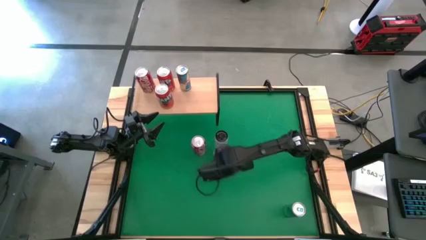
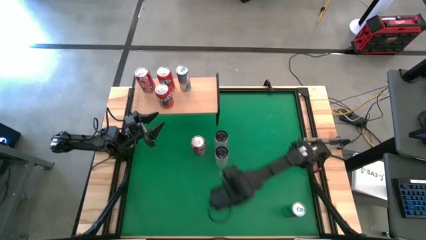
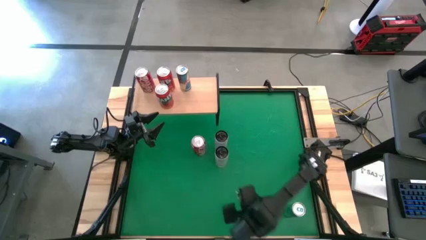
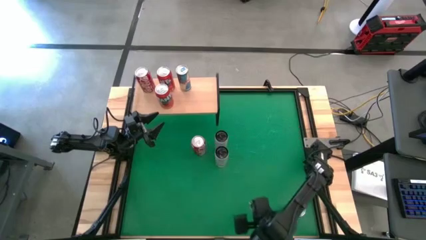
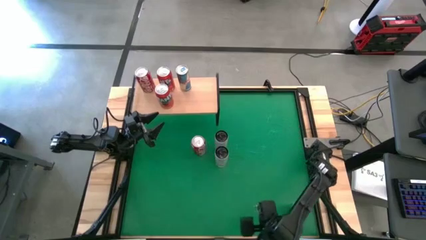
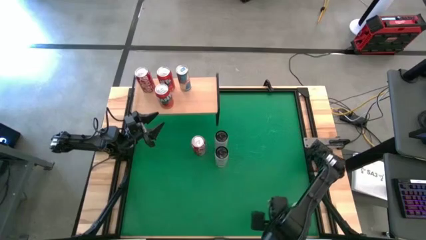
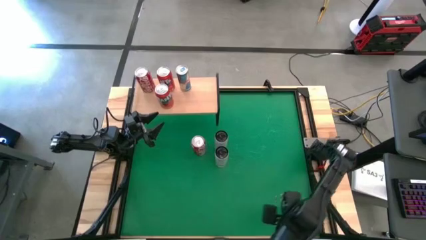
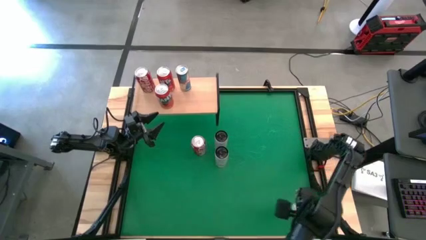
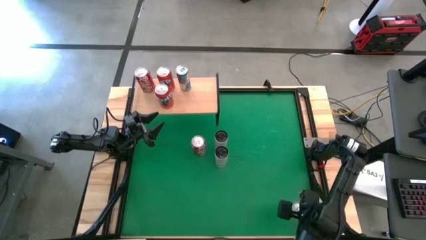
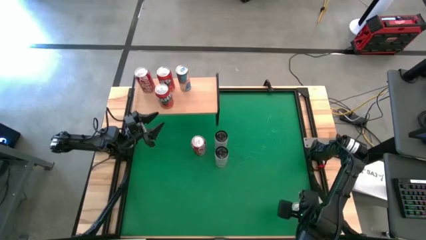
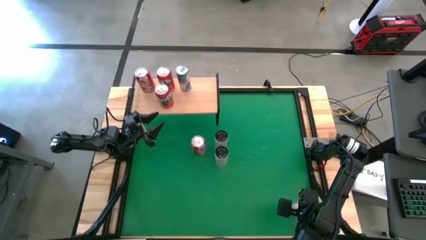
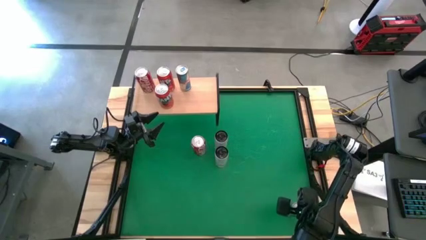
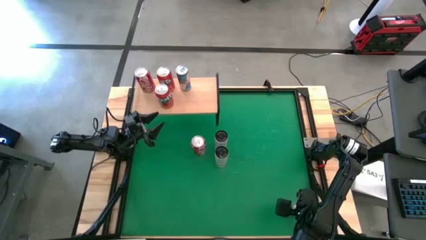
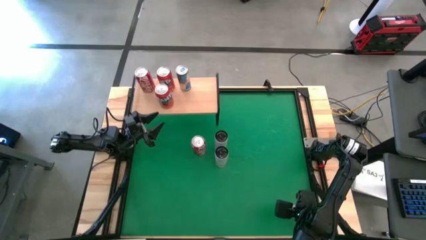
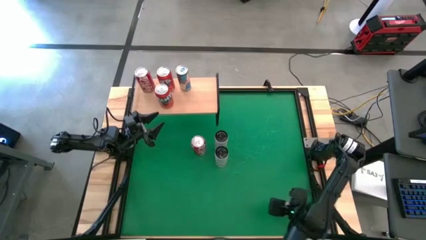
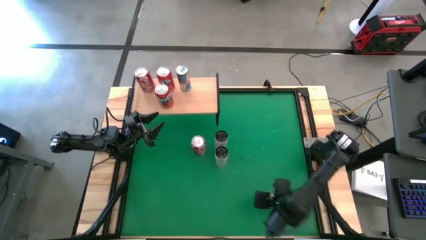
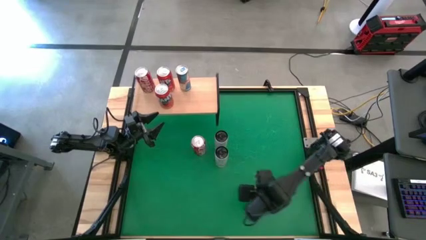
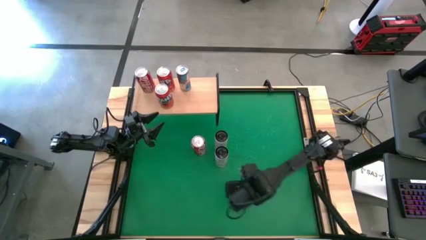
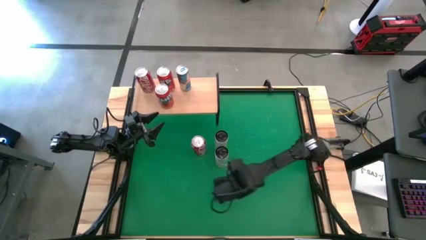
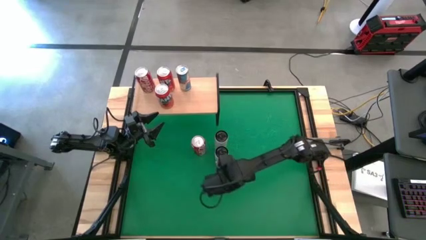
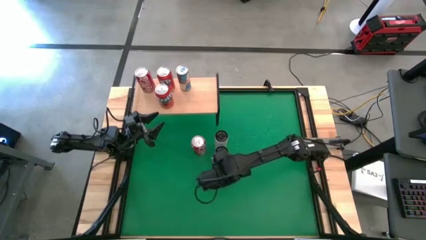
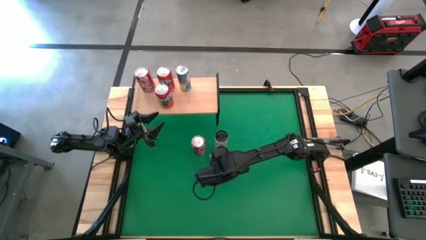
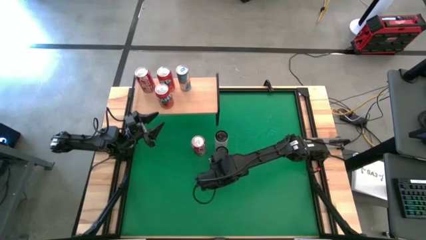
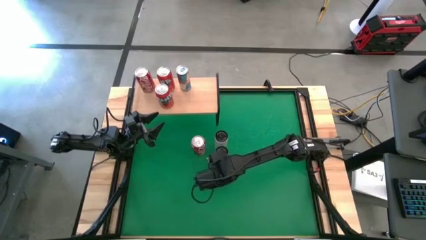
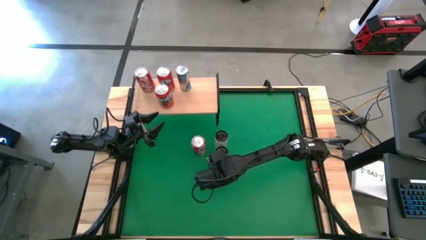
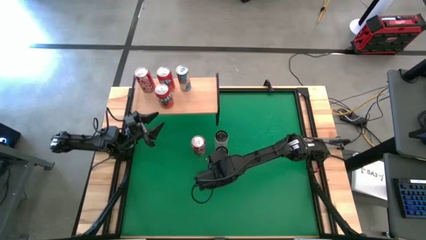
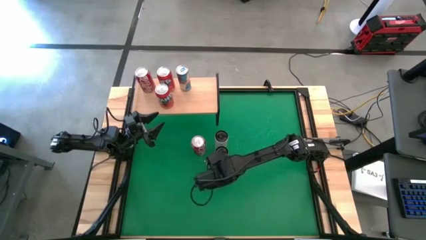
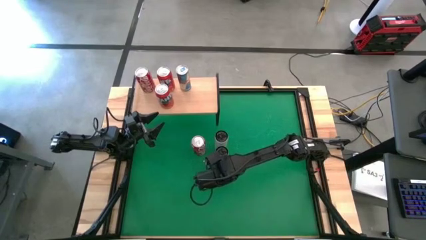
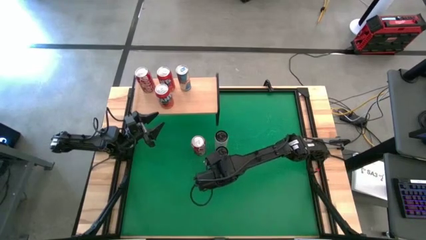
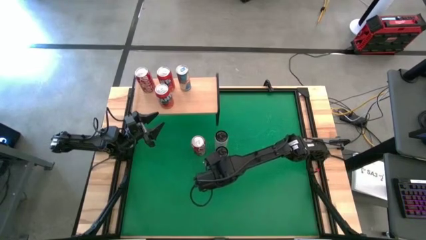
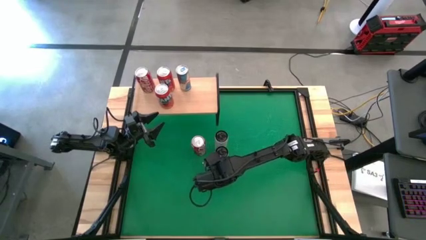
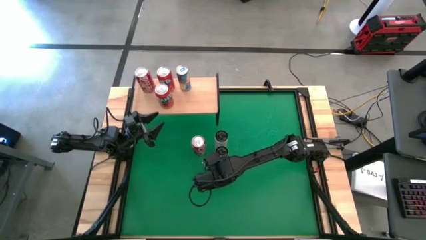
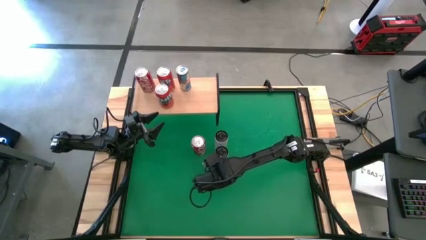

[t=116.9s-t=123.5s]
Task: Place canned beverage on shelf
Move the blue soda can to the center of the table

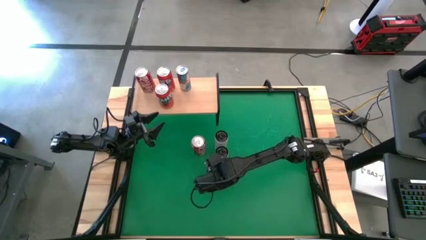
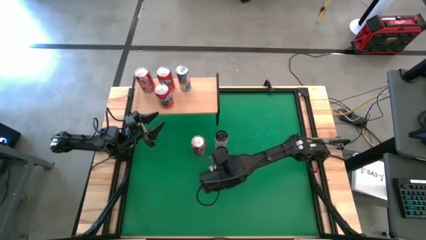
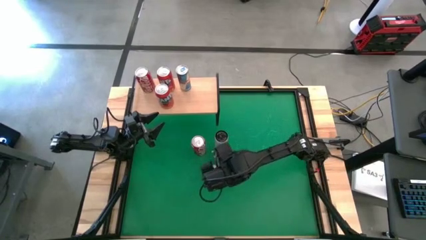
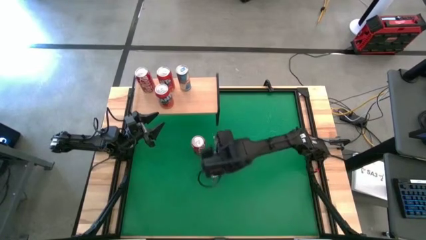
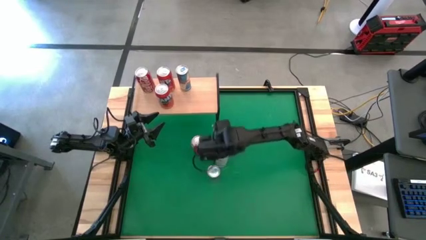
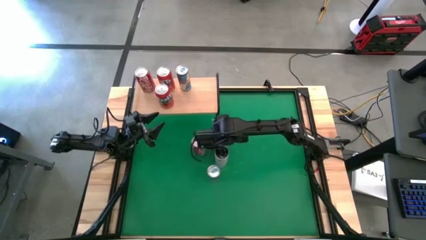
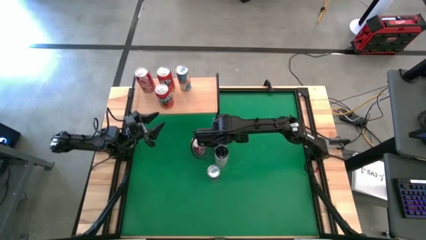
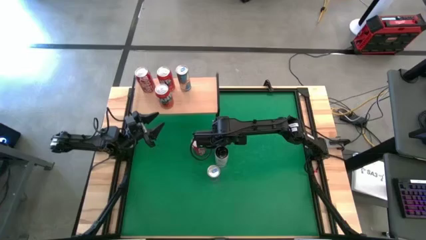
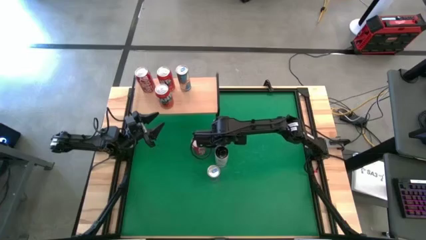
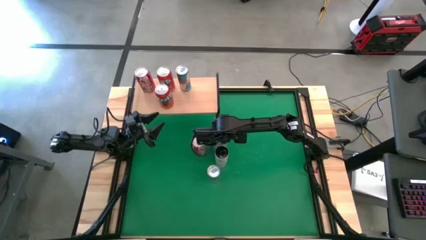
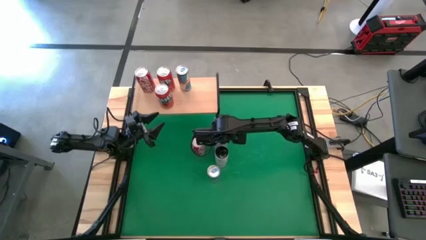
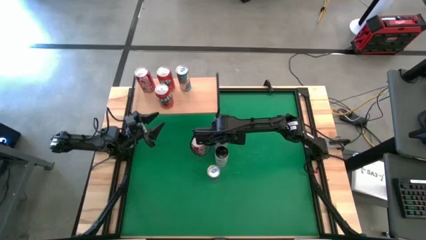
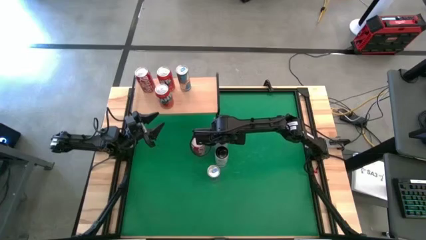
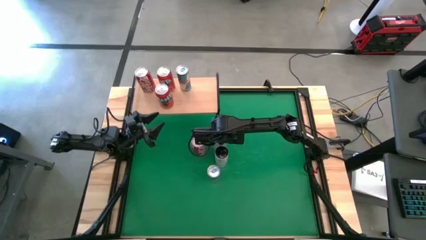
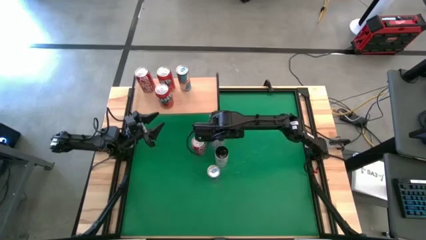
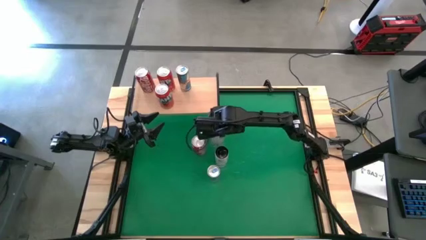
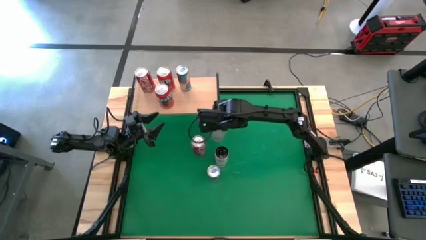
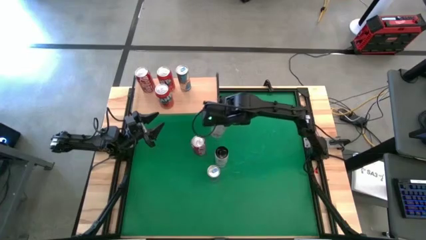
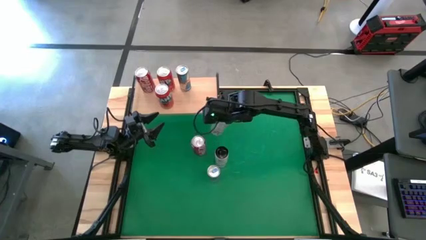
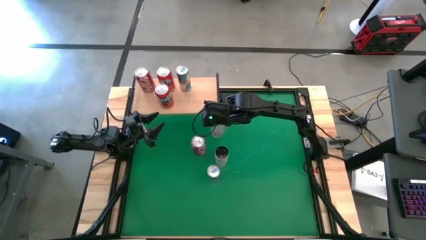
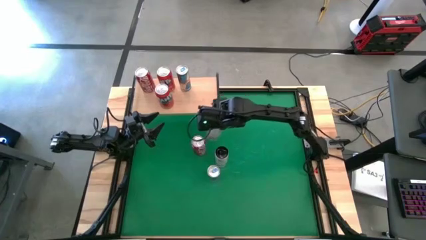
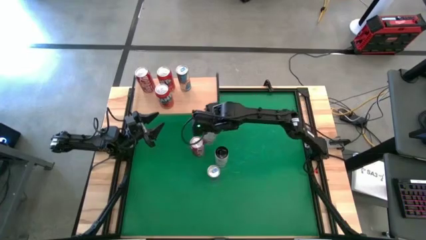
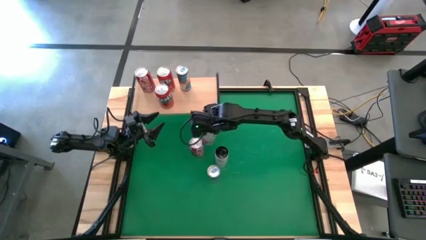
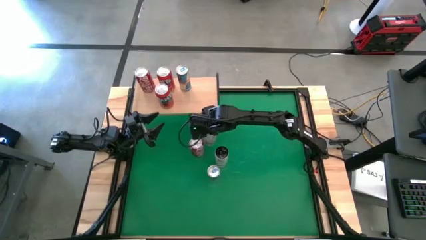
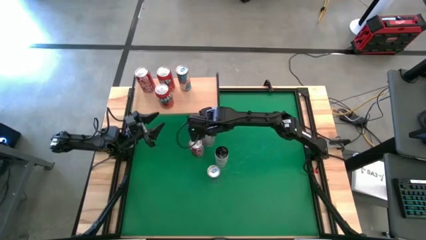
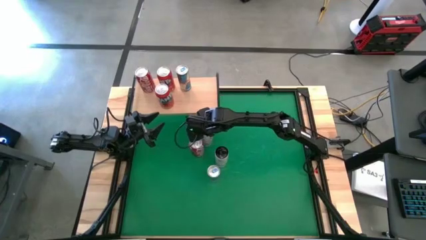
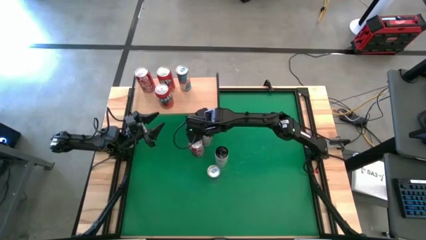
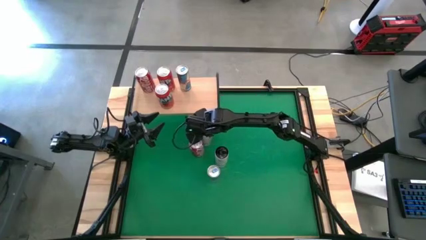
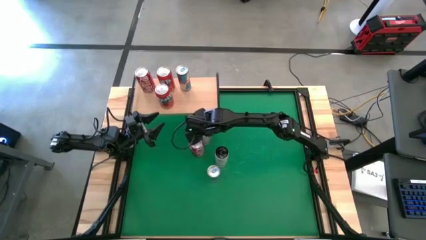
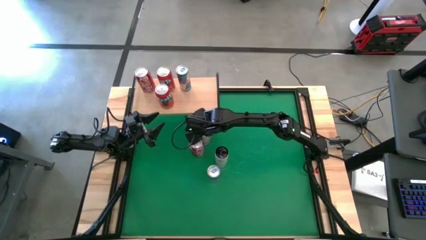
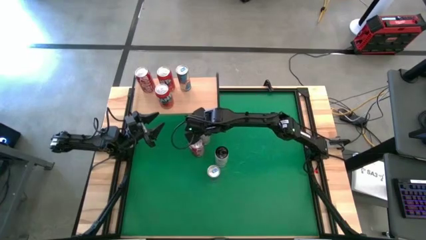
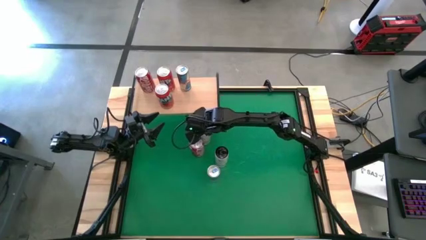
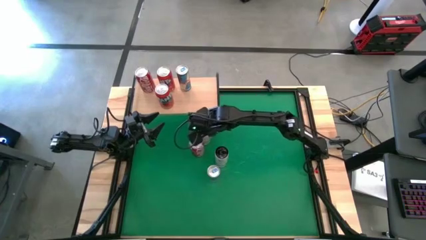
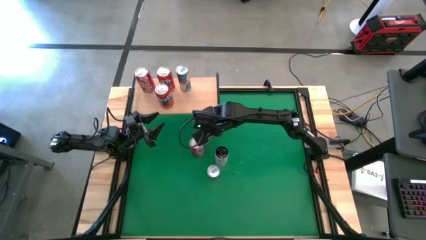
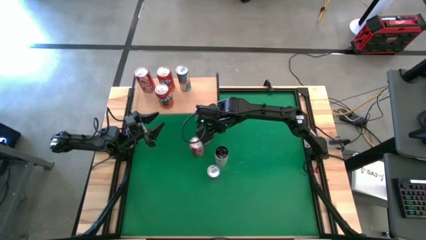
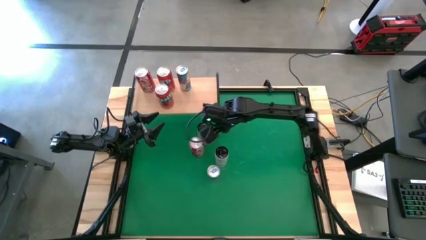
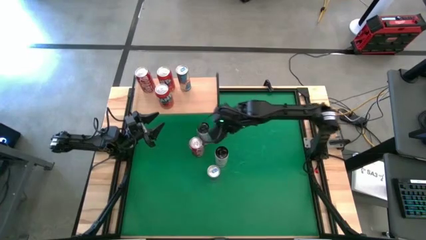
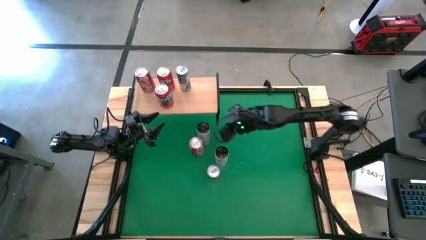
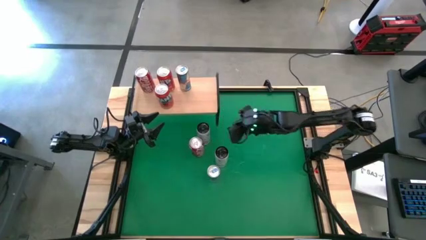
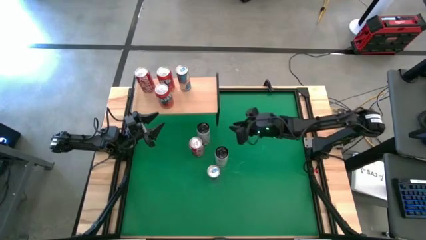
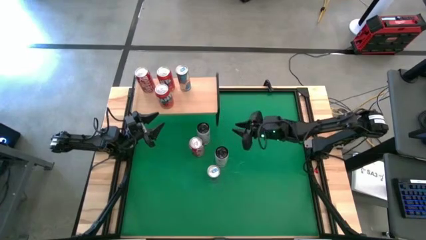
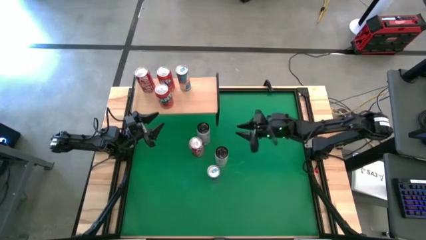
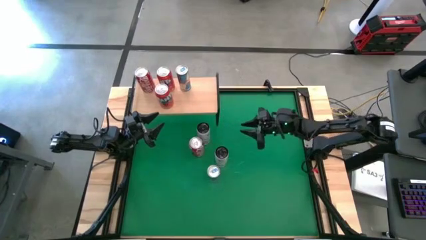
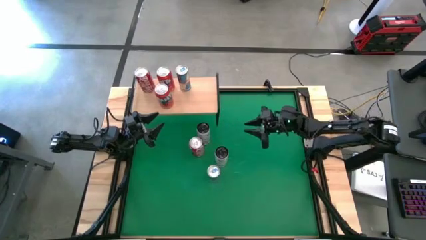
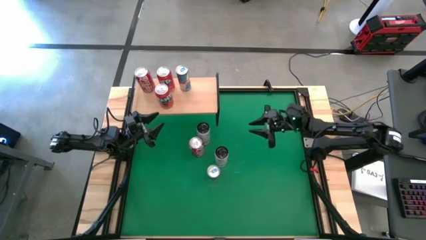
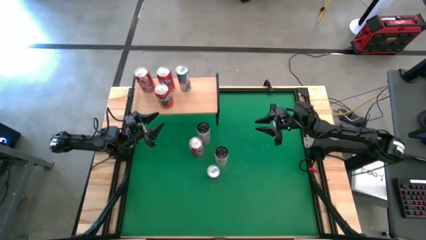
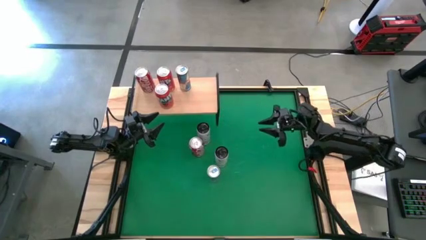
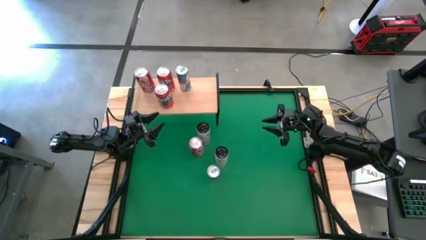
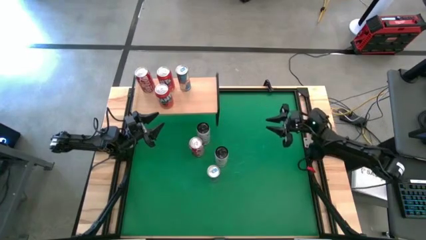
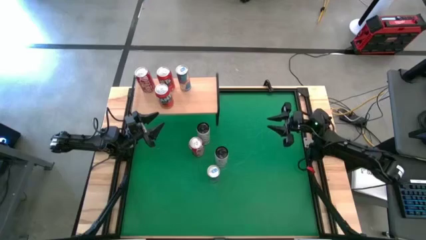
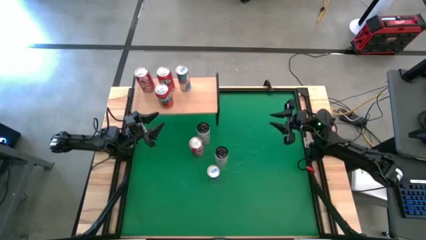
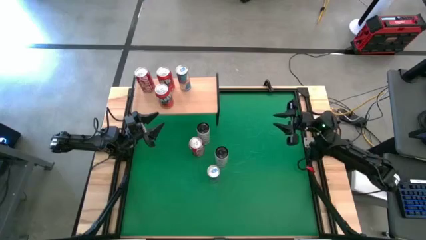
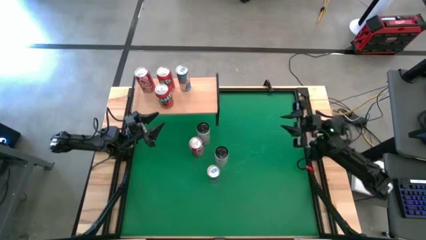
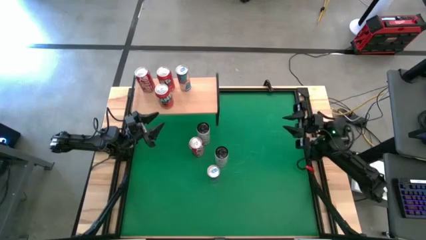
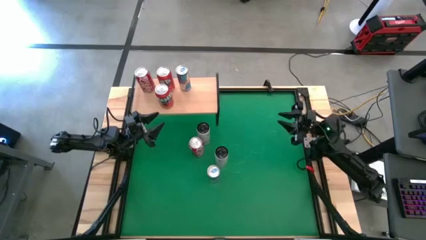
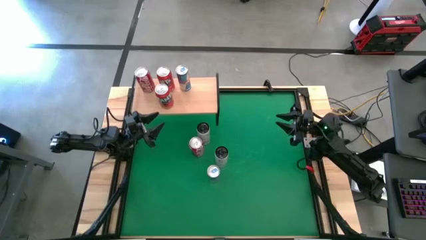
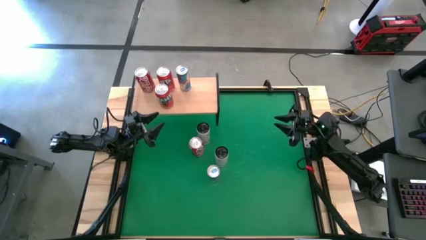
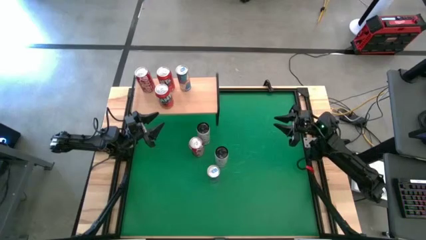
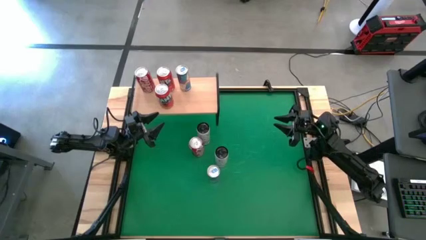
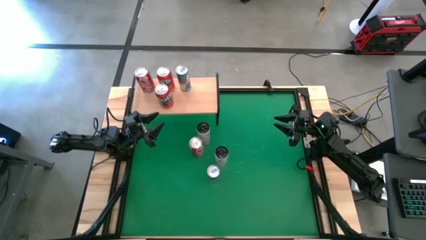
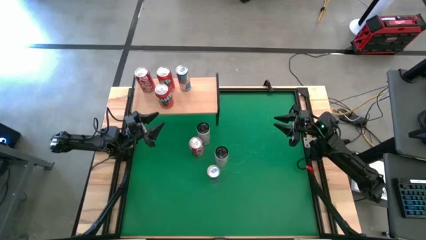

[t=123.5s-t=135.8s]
Put the top white soda can on the shelf
